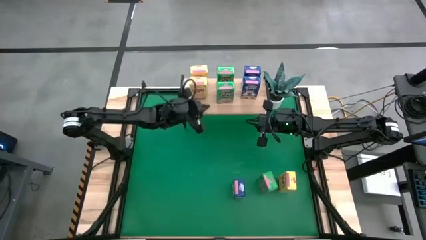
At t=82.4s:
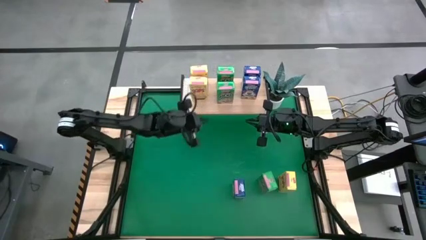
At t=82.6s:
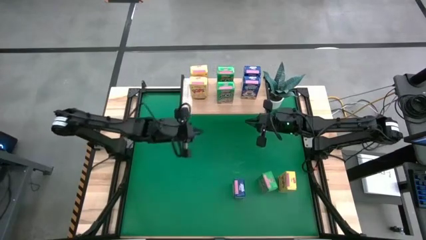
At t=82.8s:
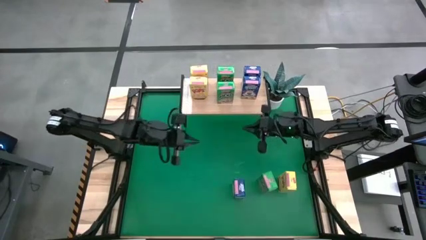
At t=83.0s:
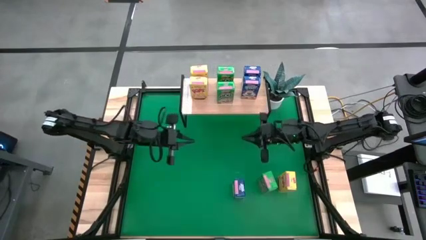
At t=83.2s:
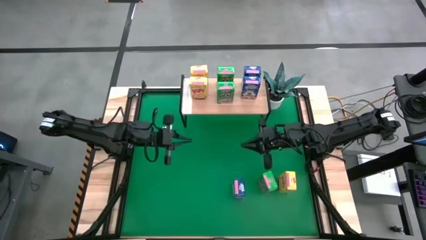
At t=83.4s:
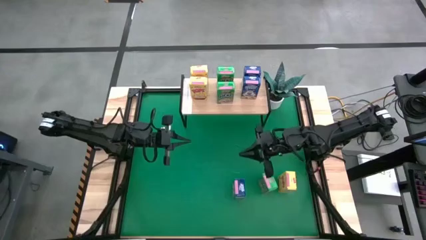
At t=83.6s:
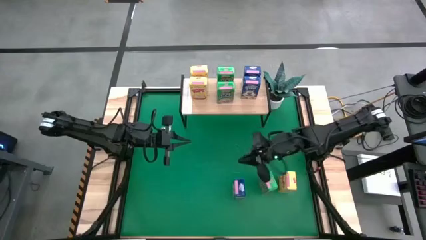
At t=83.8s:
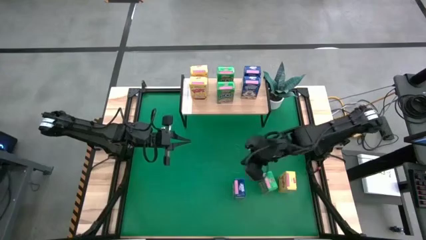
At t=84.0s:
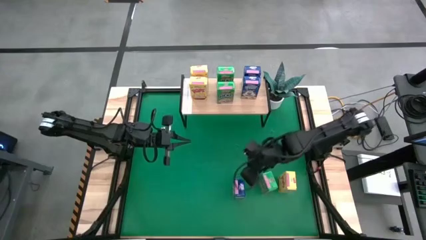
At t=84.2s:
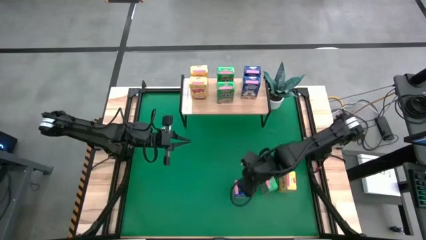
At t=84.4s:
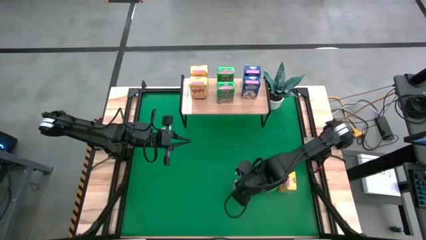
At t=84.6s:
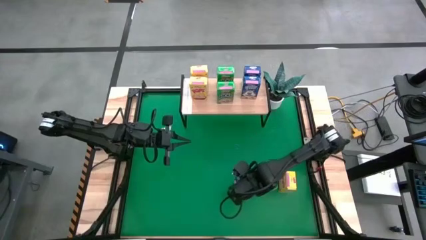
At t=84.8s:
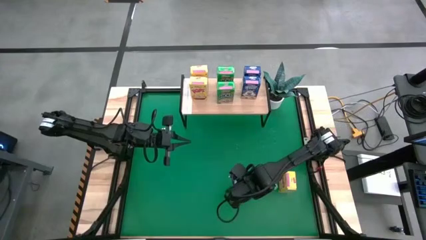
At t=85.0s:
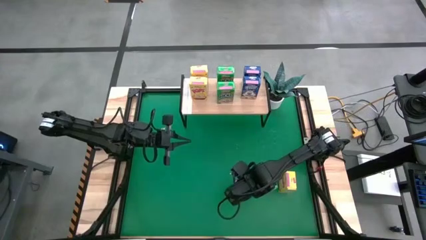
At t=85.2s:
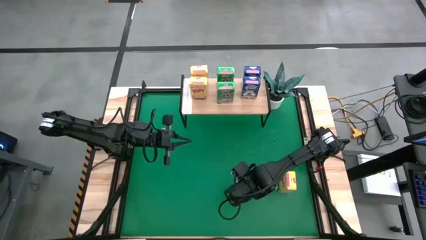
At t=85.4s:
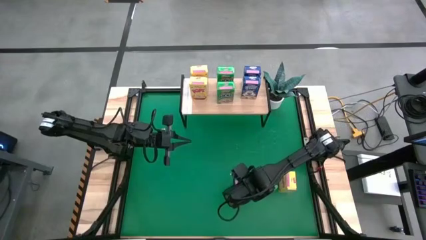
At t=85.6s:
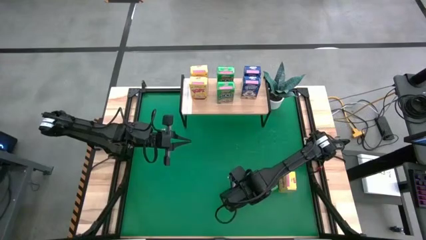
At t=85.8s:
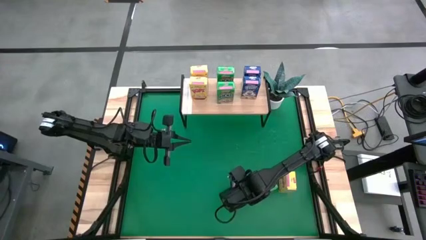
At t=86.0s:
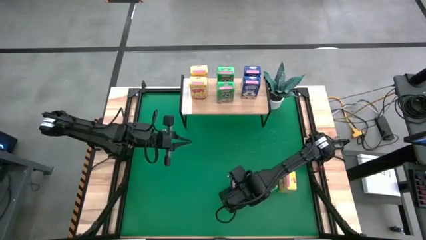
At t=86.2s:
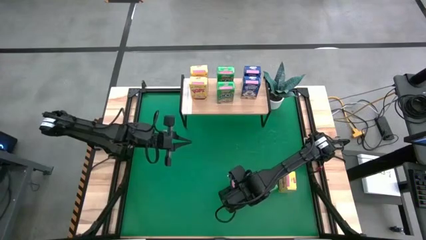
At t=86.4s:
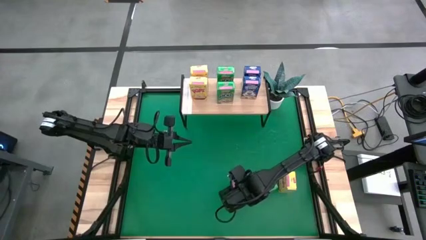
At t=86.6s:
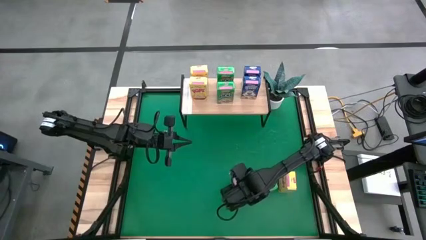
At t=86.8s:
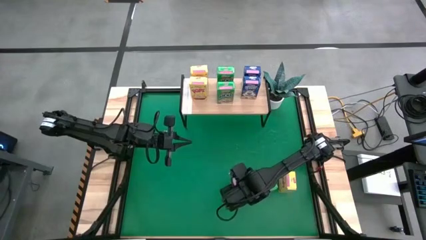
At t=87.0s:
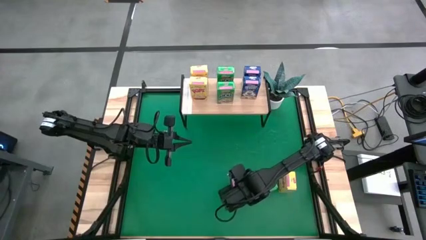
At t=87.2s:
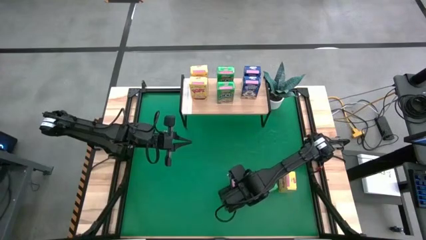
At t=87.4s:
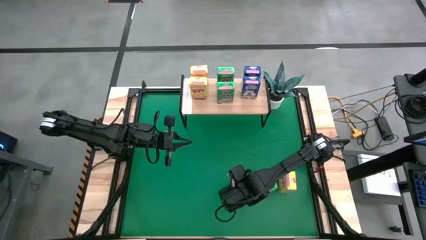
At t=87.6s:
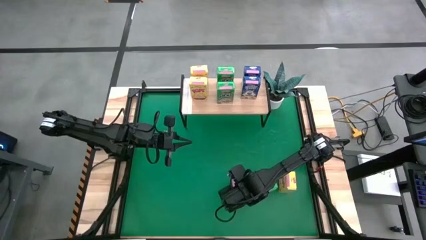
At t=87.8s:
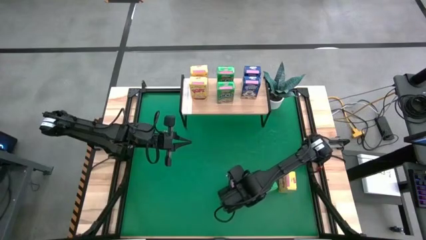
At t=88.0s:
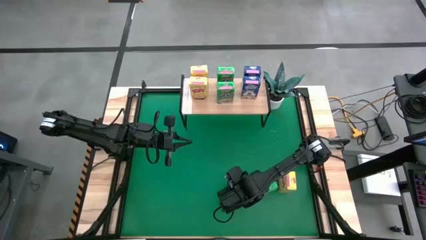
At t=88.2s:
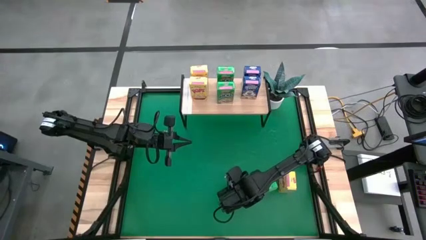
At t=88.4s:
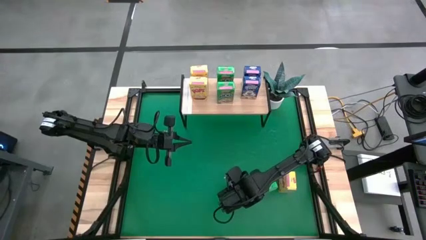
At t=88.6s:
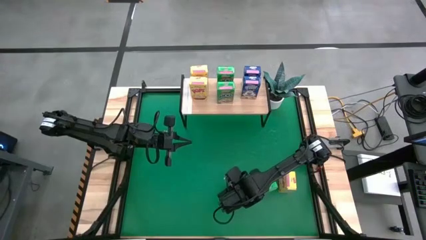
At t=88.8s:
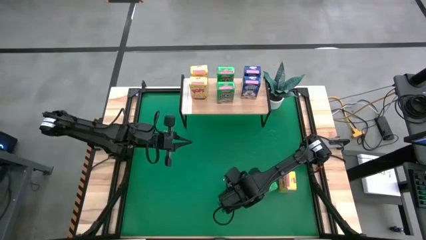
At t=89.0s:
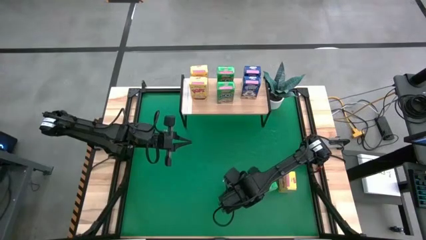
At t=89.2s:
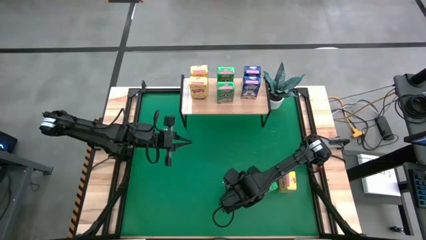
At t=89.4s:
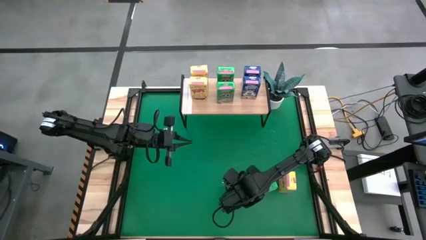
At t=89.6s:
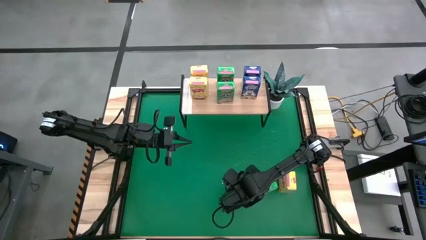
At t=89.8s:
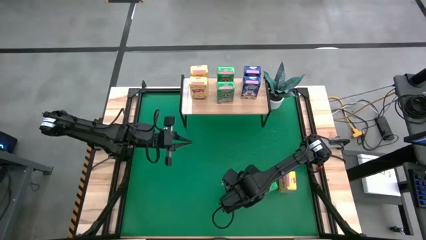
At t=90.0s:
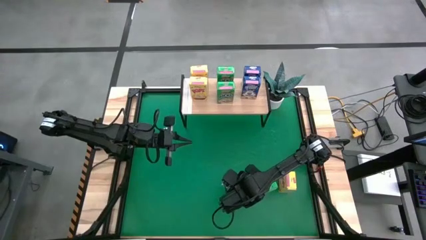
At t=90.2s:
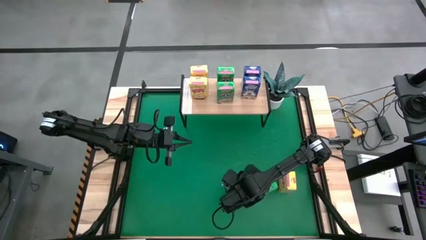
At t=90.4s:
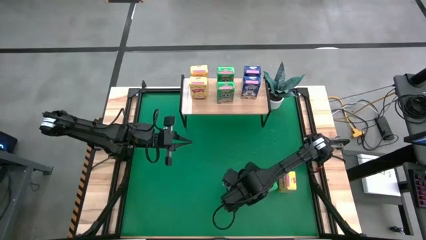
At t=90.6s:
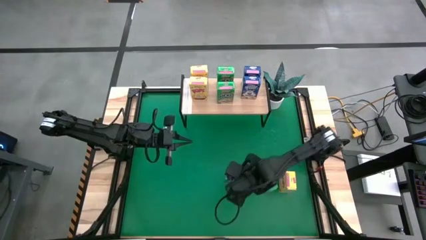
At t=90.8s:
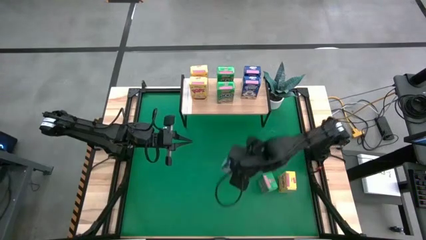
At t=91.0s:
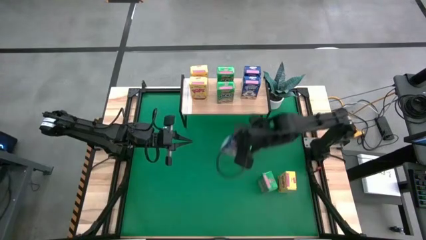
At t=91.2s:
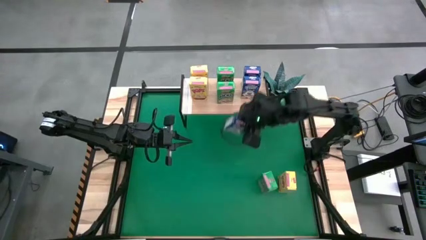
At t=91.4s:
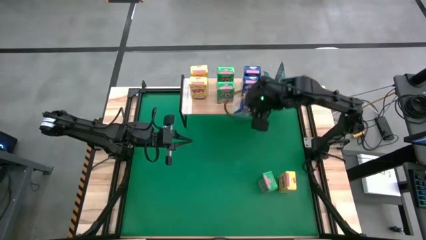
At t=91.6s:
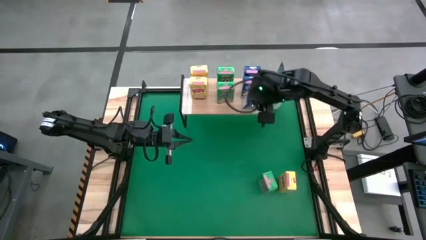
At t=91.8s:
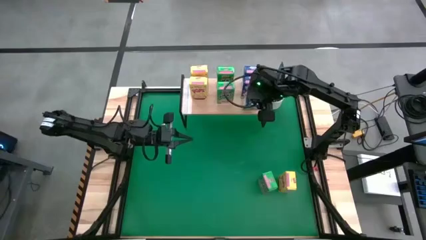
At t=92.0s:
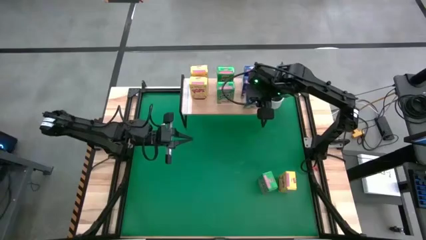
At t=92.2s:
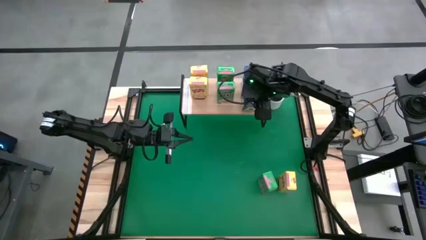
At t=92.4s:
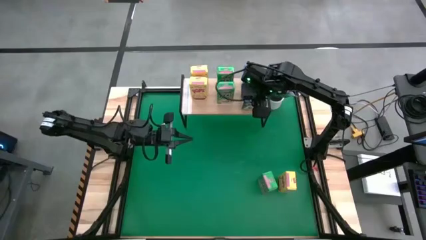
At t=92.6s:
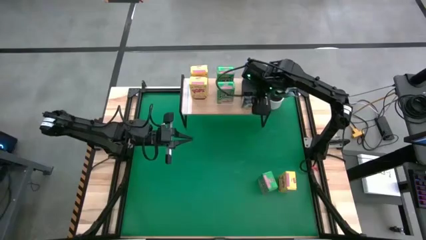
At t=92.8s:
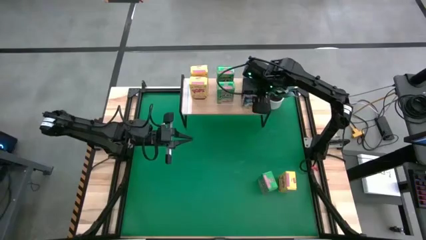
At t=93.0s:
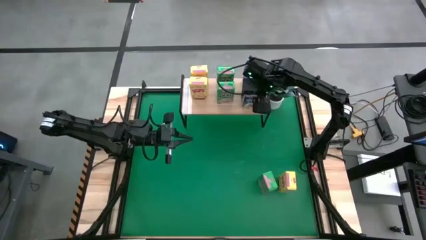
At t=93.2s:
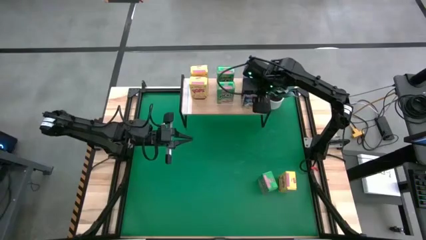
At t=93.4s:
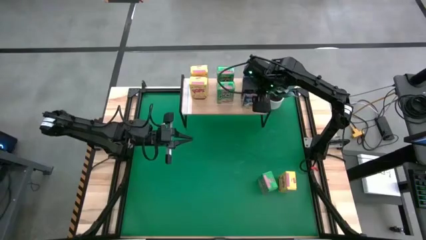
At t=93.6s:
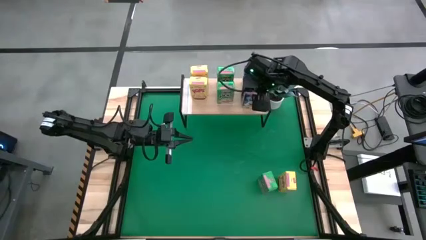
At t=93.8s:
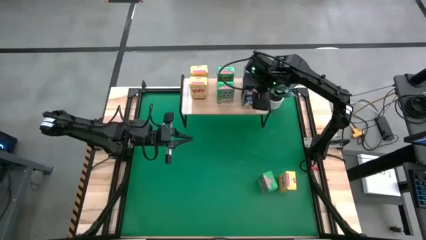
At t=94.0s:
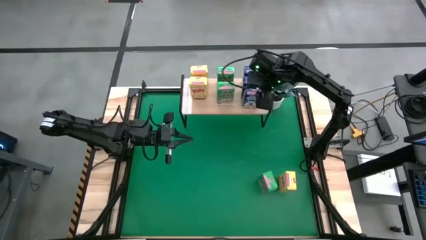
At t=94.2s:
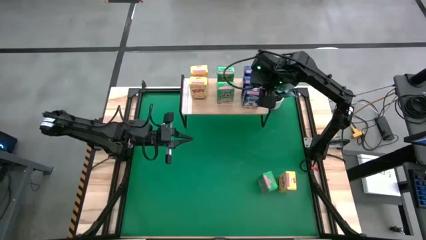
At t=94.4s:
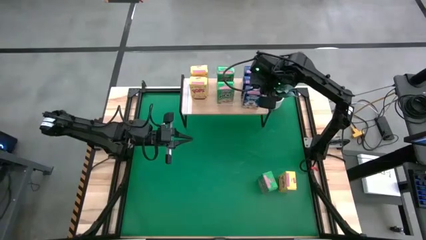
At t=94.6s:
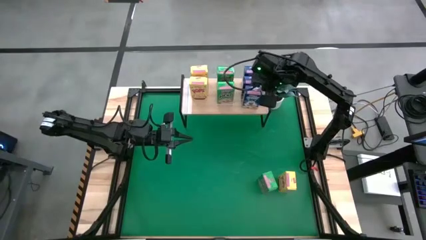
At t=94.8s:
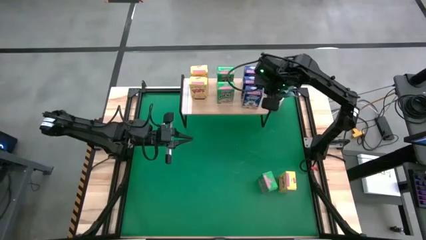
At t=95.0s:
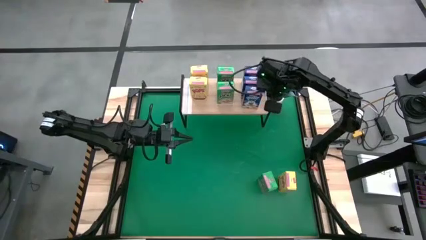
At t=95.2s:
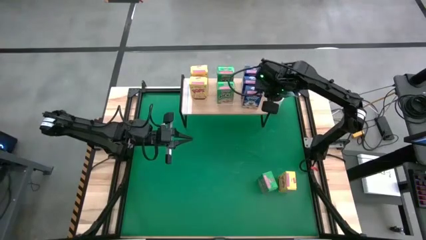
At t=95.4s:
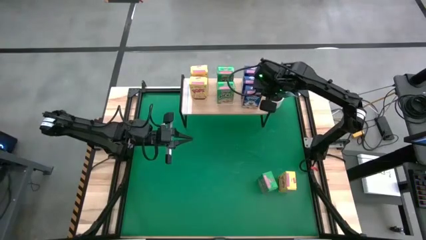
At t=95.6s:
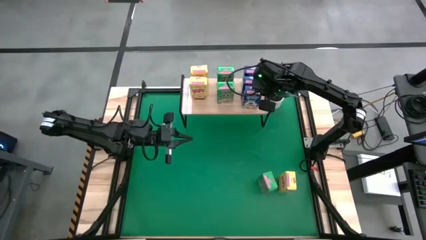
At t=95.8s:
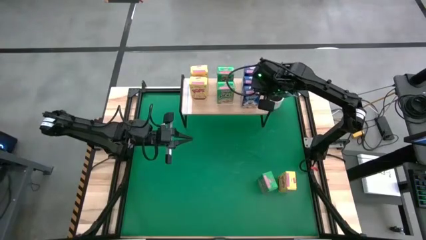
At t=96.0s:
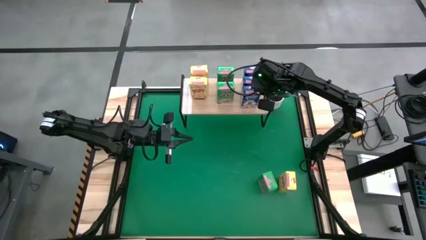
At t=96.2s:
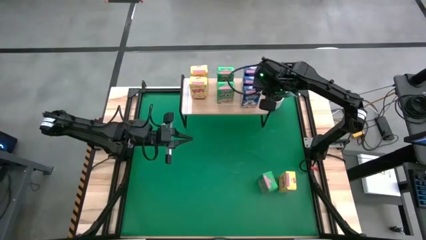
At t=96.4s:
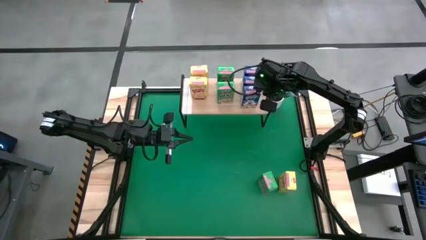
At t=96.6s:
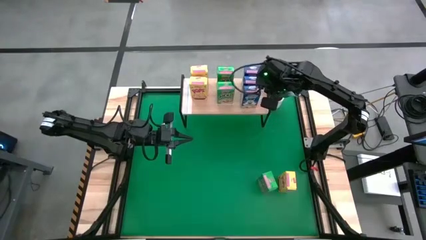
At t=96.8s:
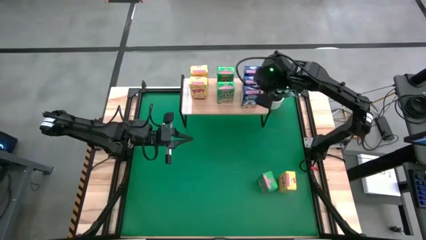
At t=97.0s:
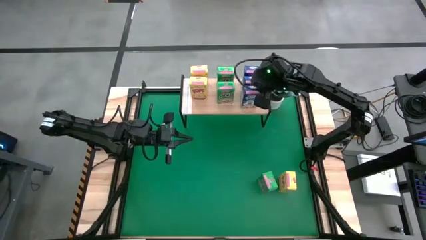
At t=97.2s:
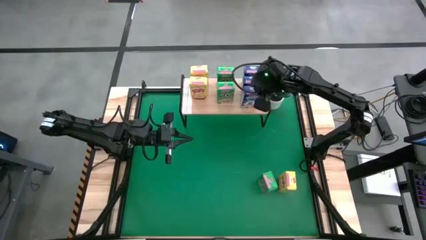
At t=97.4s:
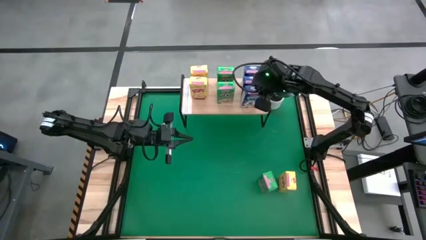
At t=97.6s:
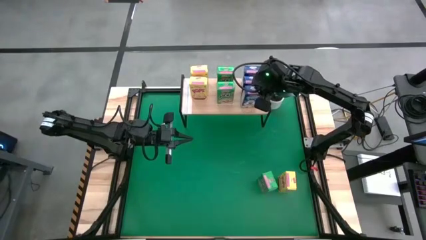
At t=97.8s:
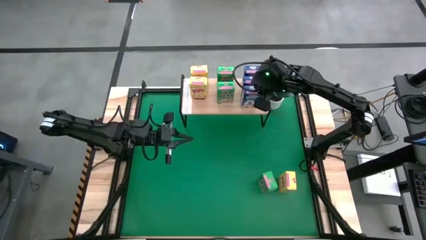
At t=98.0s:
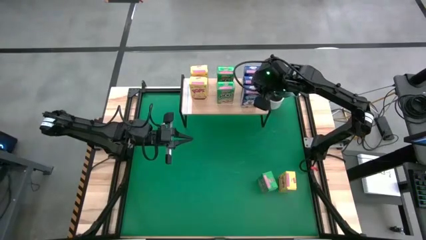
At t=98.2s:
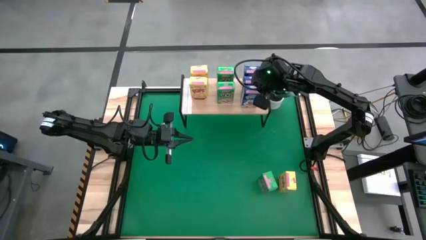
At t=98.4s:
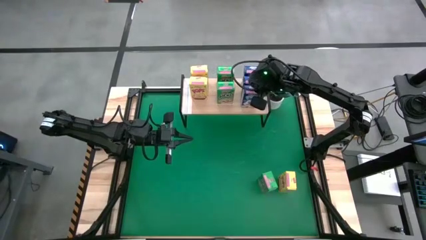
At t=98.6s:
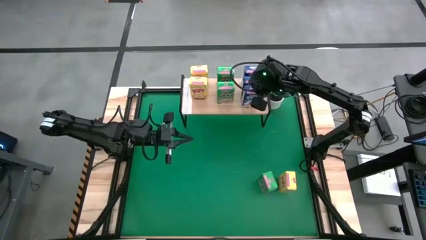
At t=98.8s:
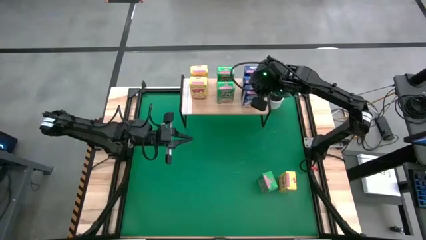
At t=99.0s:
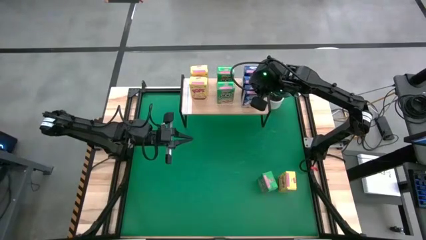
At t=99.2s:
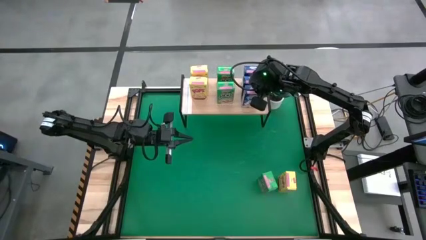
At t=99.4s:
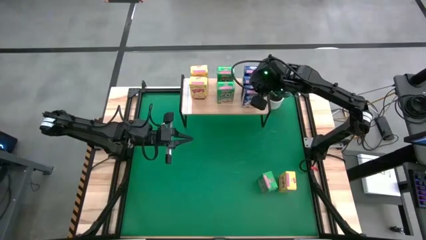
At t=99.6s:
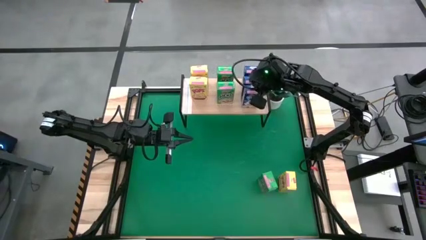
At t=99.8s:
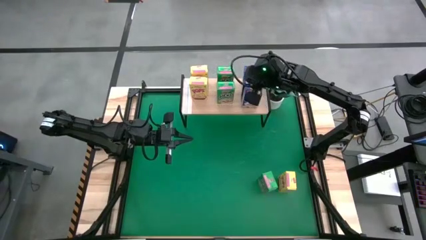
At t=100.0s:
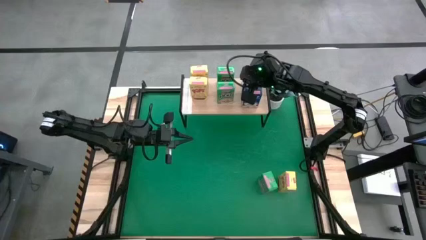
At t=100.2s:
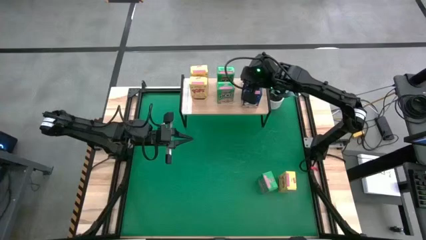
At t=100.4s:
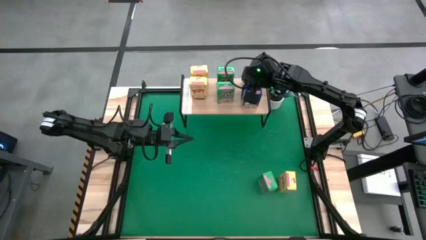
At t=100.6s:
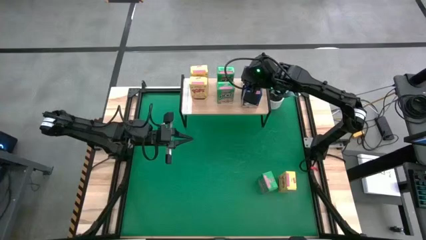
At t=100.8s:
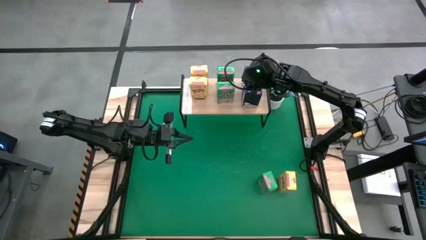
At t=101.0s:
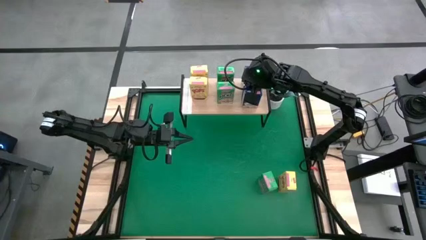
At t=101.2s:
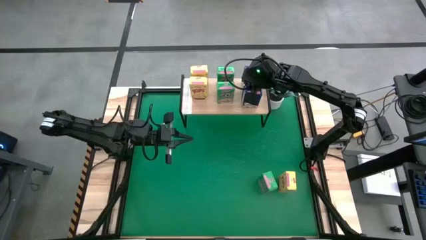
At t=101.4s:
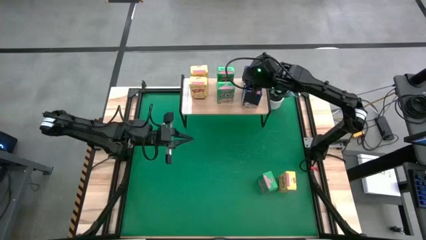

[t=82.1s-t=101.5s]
Task: Stack cereal on shelf
Put the blue cereal box on the shelf aligned with the other blue cereal boxes
